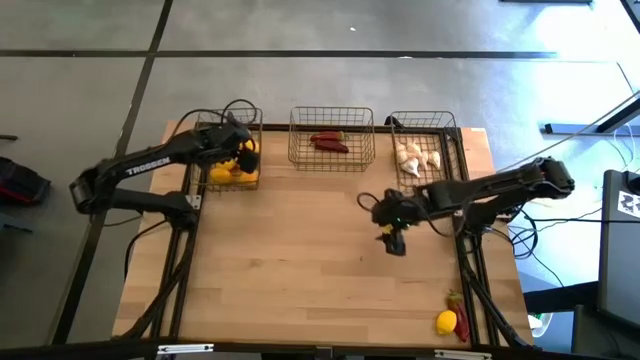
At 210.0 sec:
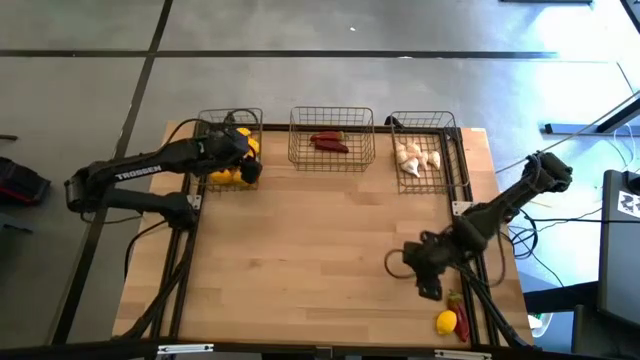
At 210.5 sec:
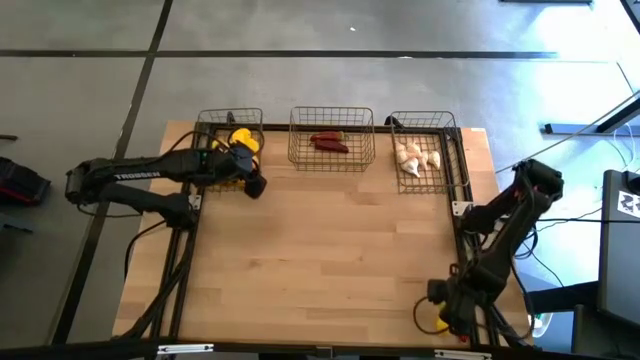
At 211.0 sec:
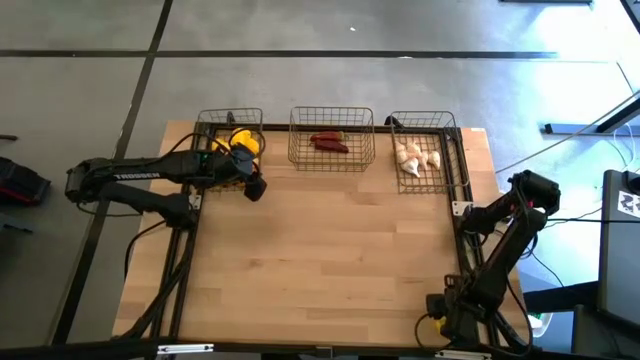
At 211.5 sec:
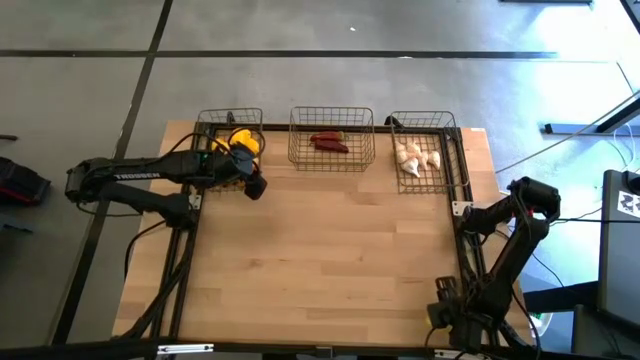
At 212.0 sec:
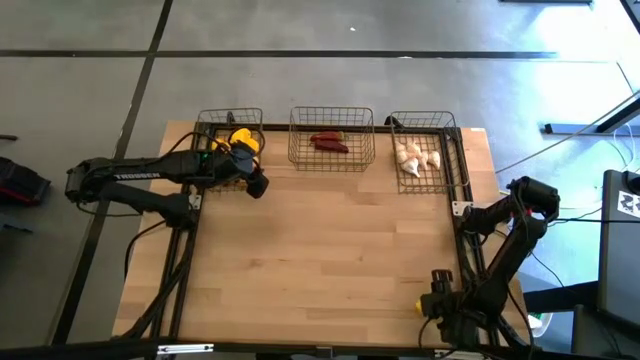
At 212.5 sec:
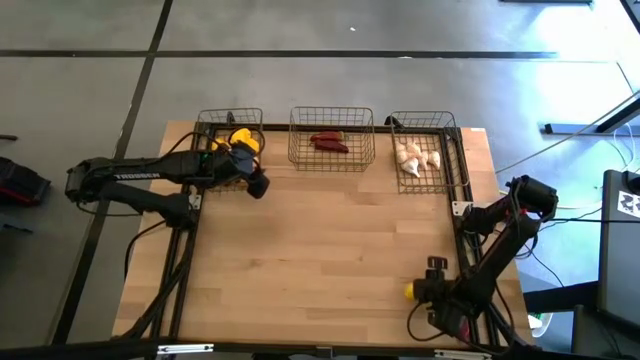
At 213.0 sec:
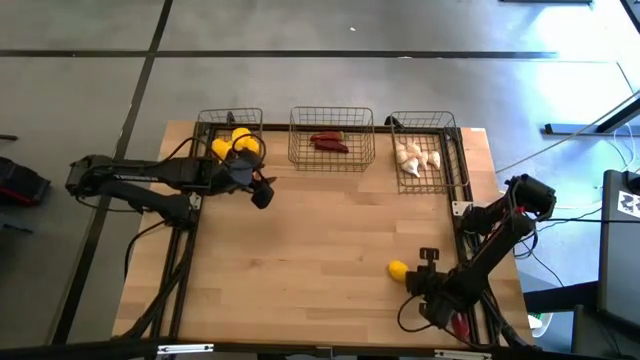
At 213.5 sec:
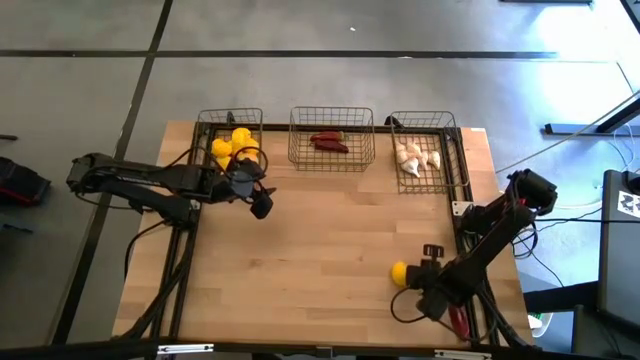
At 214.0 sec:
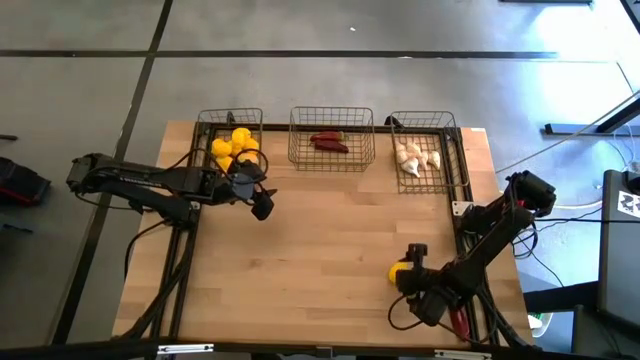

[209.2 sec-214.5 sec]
Task: Sort produce into baskets
Put the yellow lemon into the left gold wire basket

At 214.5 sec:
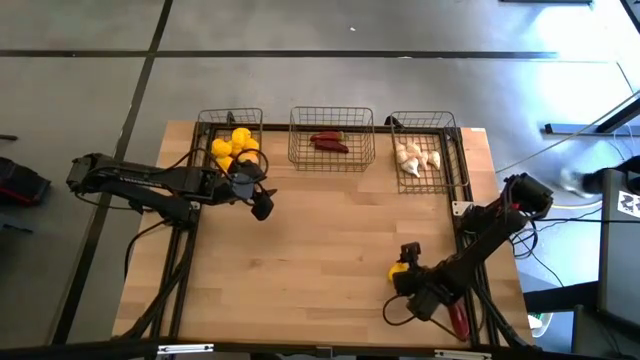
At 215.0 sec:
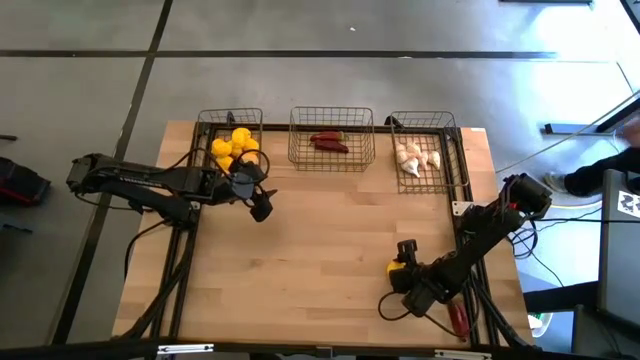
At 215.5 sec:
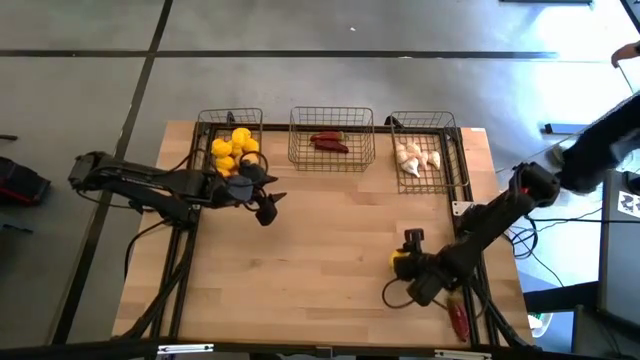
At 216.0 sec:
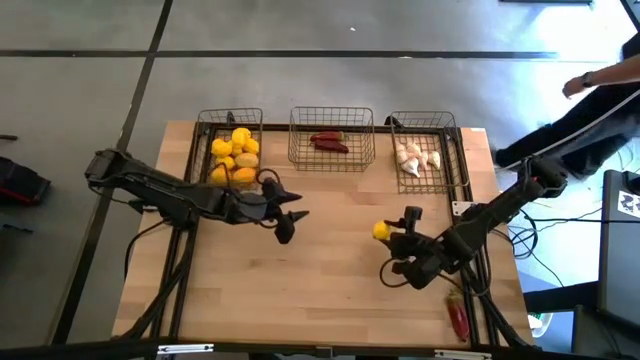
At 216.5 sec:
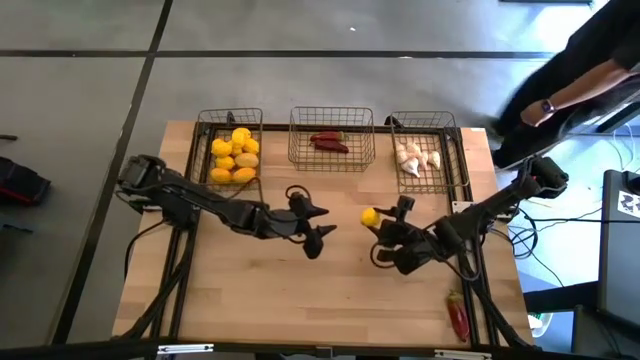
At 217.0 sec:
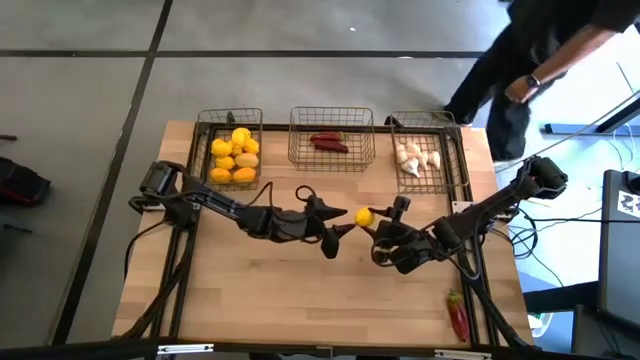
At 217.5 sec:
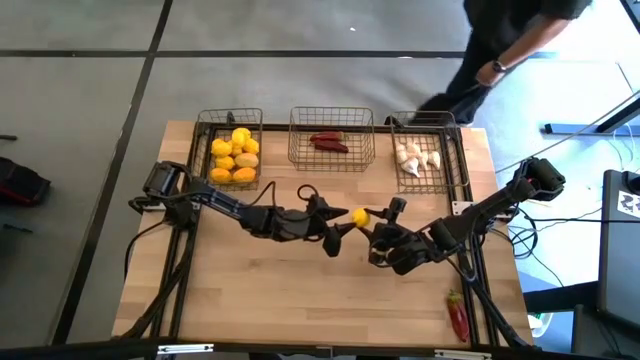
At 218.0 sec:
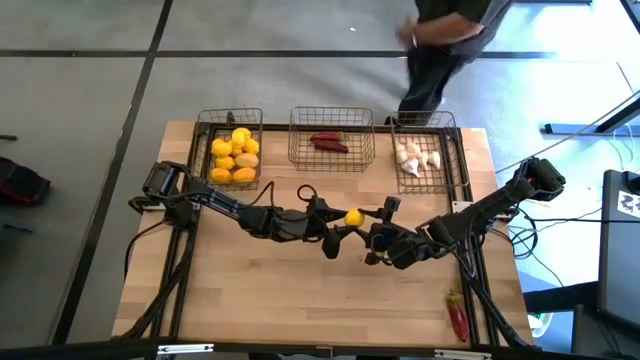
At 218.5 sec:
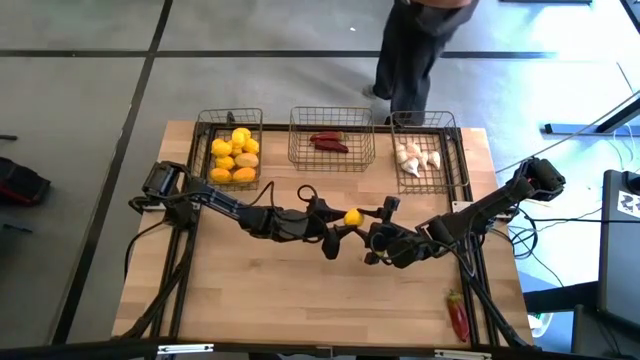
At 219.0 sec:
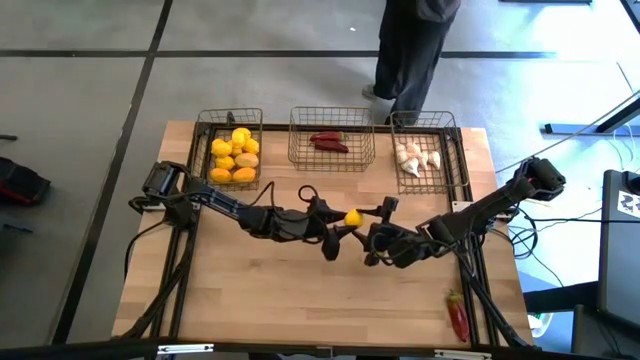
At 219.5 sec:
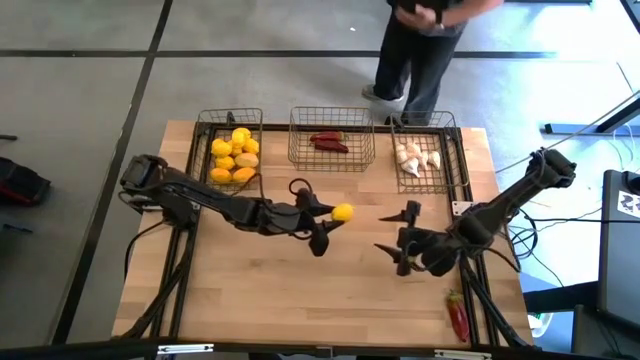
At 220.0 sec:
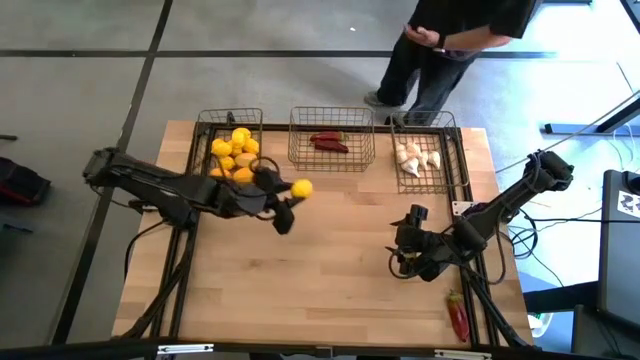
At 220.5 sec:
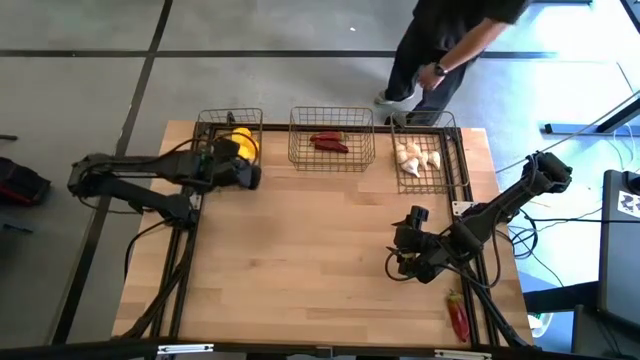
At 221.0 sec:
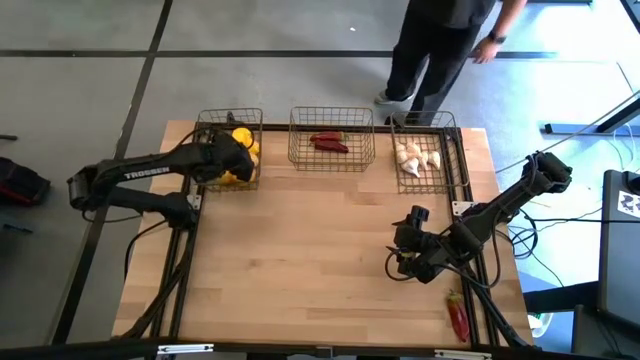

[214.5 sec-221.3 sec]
Put the yellow lemon into the left gold wire basket

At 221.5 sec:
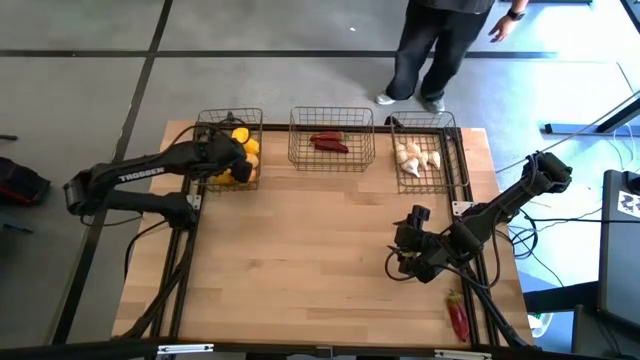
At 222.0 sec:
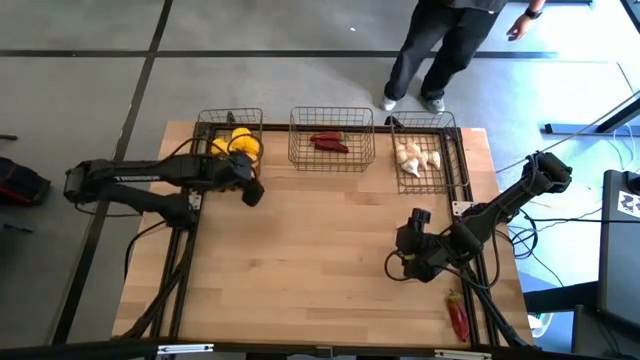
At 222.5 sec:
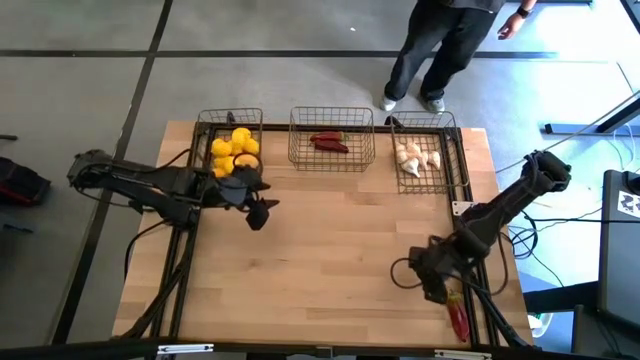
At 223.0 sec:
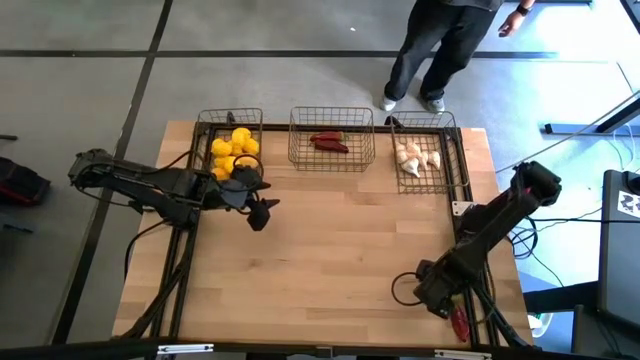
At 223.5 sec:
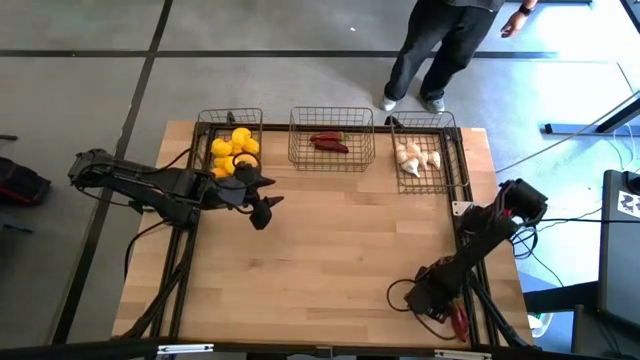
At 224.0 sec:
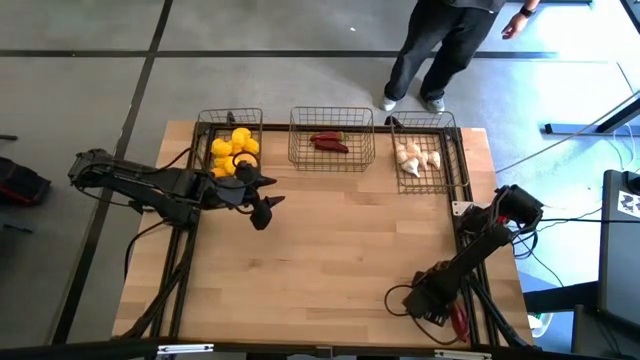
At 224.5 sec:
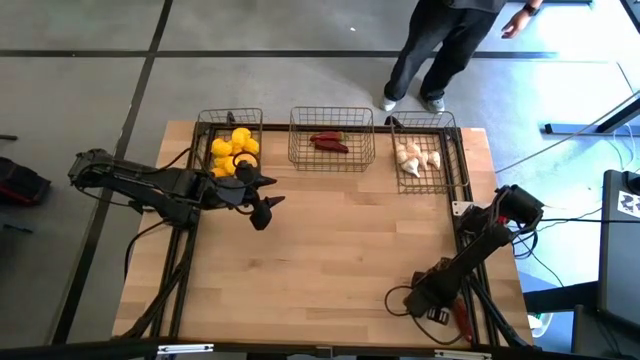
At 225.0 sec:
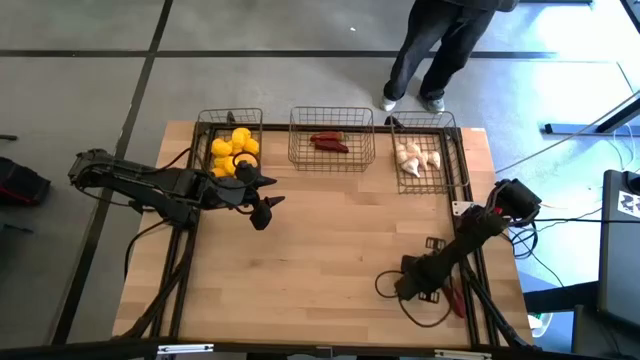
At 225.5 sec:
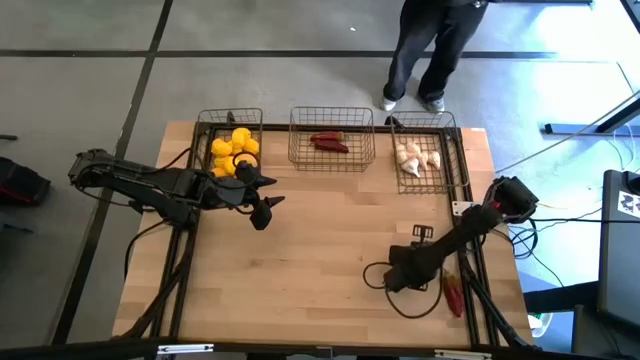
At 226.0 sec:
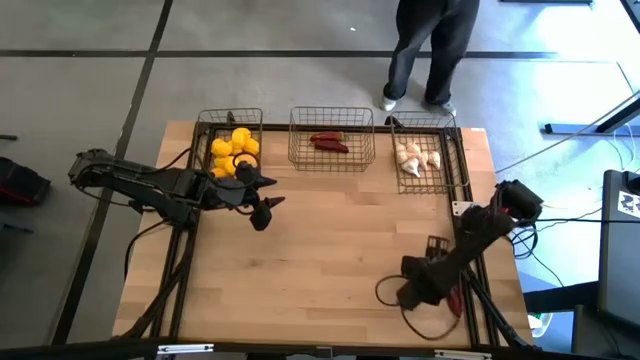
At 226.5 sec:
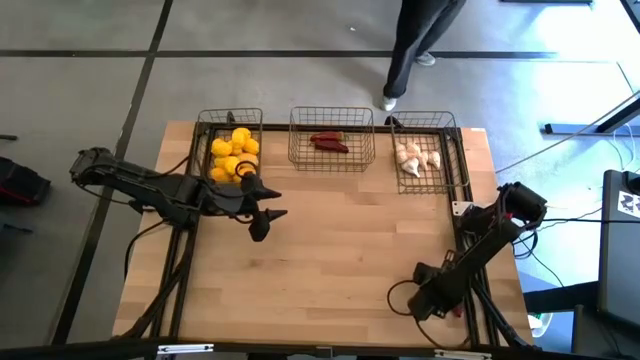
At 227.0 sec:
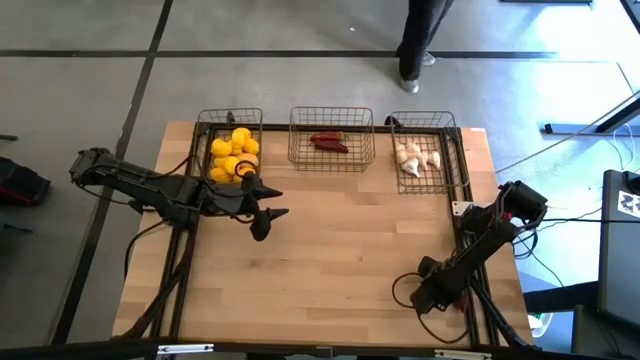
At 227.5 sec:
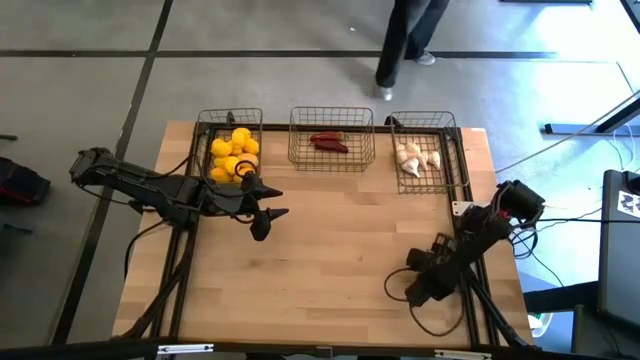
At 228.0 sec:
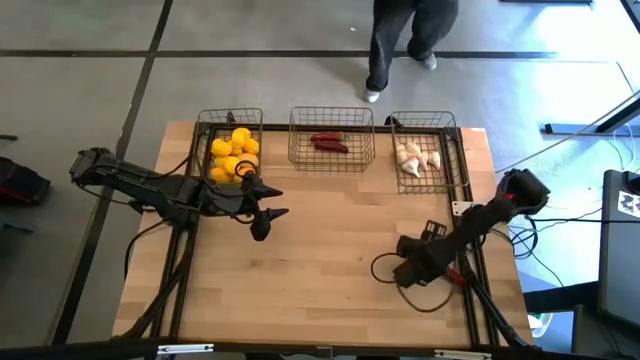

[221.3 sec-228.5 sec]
Put the red chili pepper into the middle gold wire basket

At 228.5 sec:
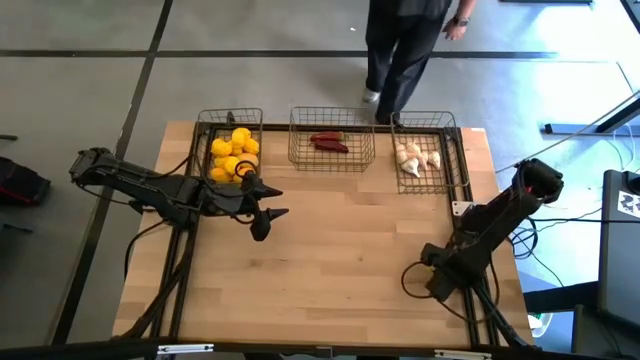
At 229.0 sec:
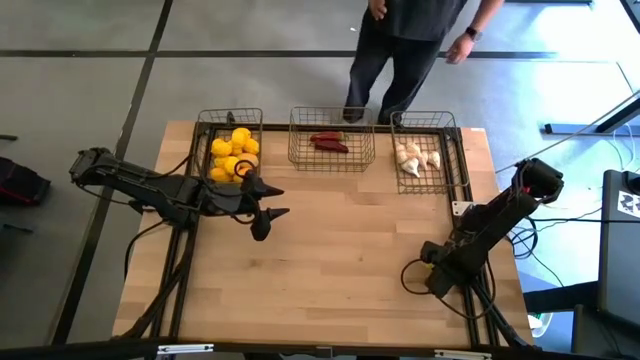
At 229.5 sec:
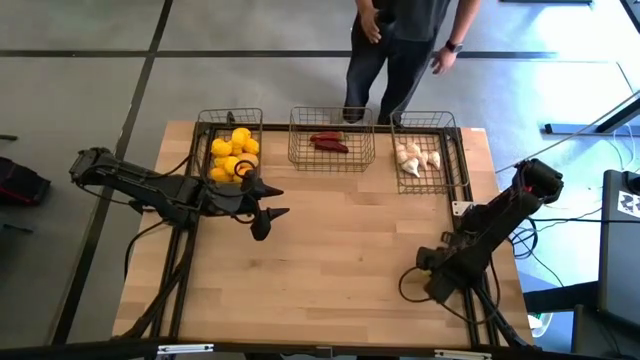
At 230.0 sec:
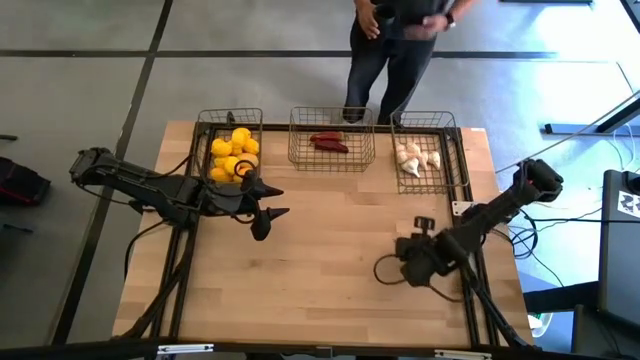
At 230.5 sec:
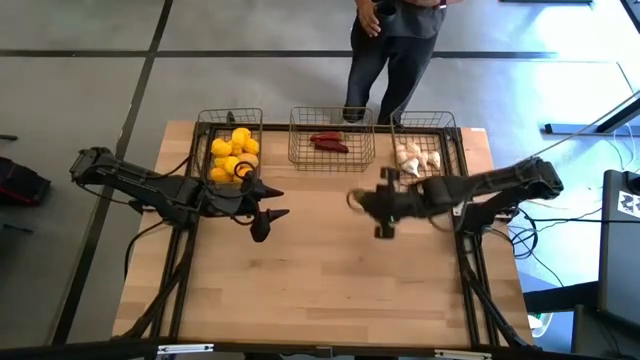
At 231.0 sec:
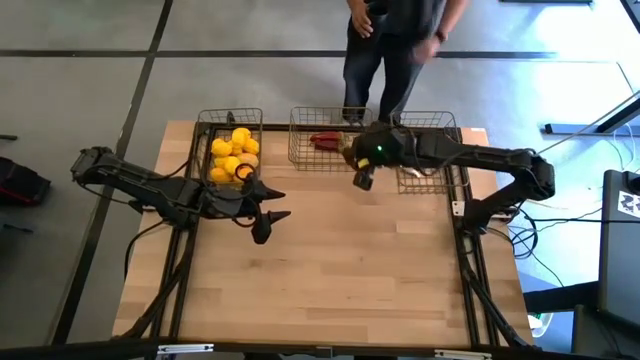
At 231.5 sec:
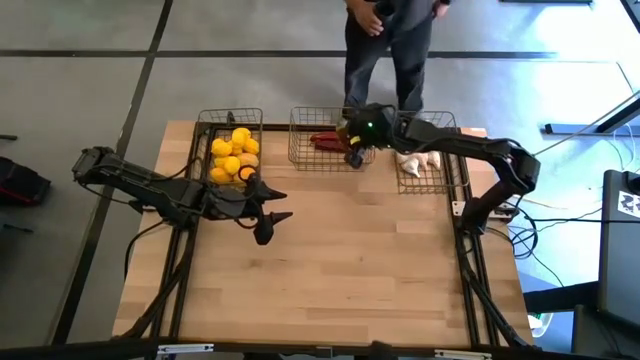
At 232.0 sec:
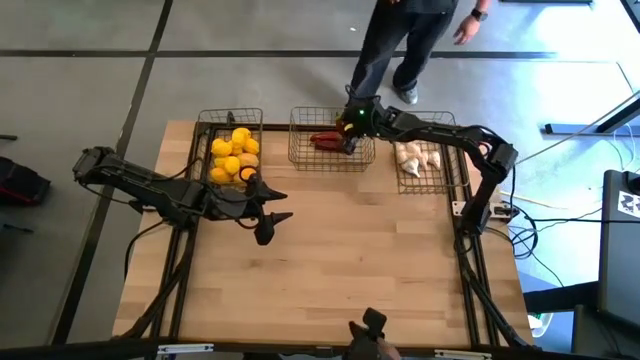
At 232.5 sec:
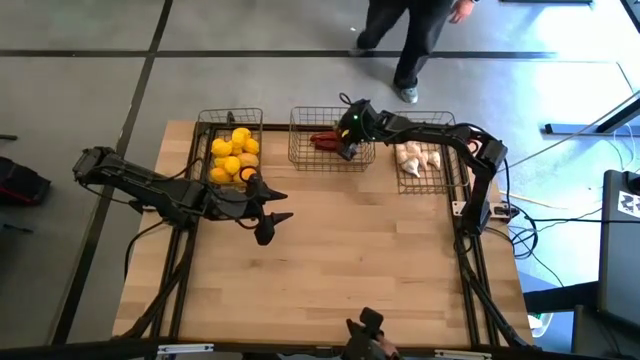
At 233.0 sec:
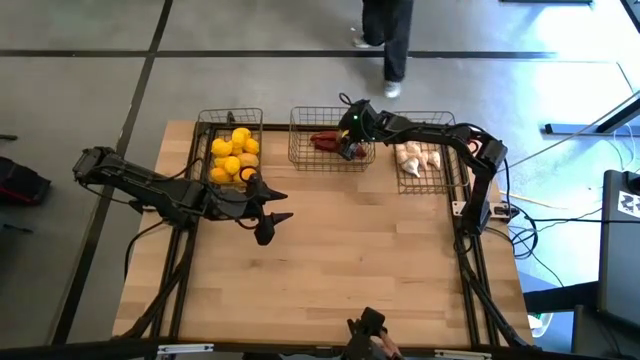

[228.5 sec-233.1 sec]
Put the red chili pepper into the middle gold wire basket
